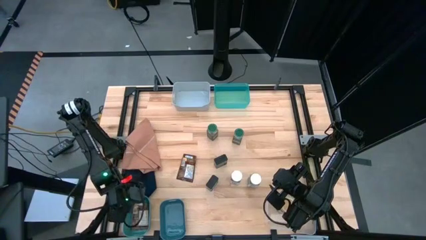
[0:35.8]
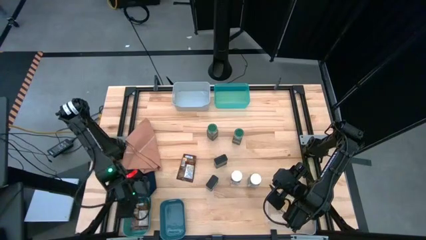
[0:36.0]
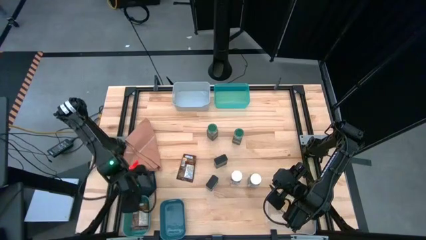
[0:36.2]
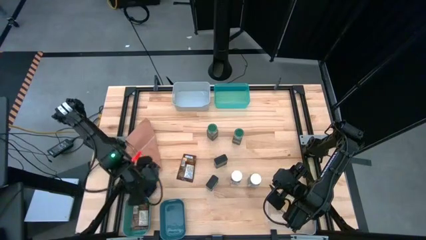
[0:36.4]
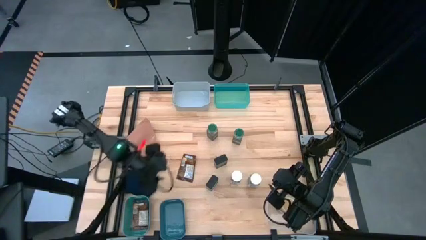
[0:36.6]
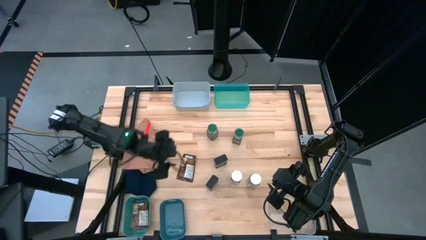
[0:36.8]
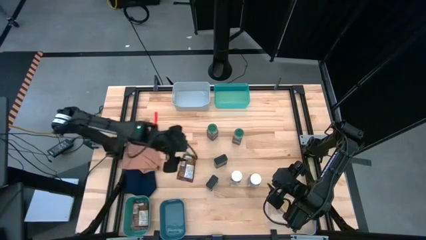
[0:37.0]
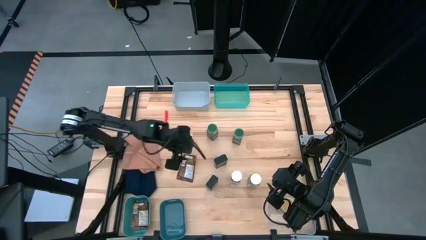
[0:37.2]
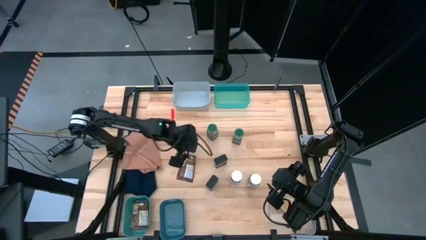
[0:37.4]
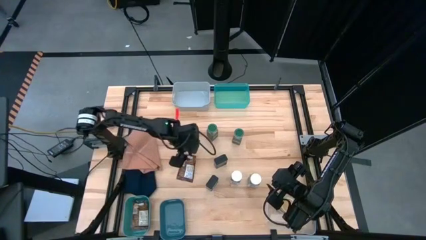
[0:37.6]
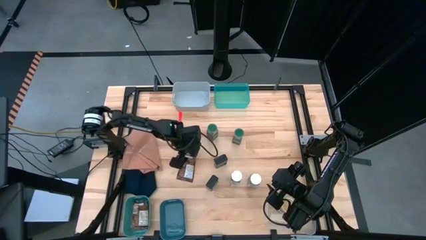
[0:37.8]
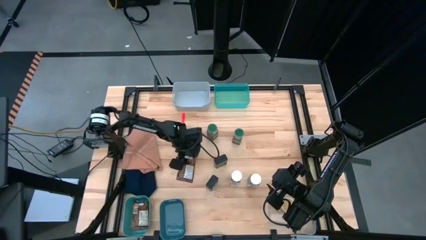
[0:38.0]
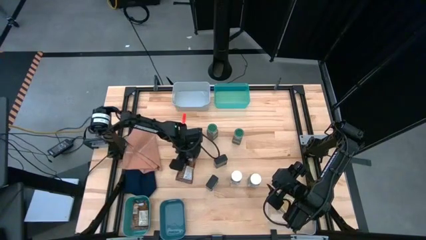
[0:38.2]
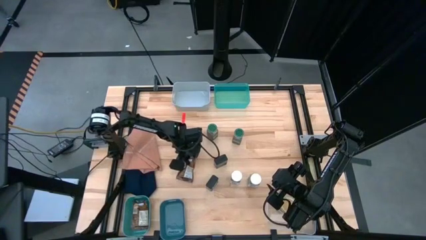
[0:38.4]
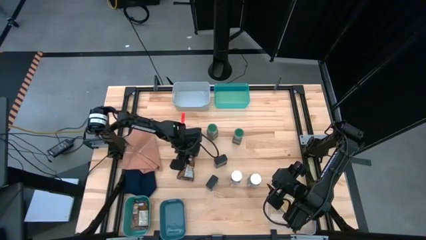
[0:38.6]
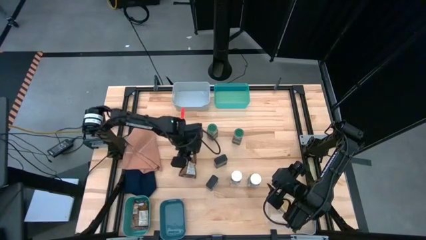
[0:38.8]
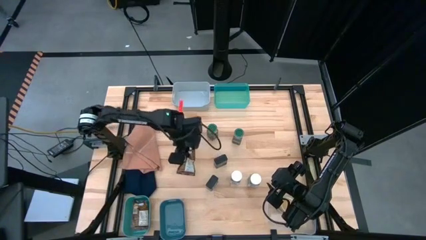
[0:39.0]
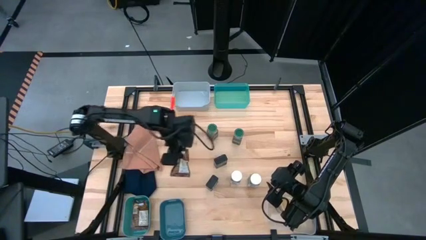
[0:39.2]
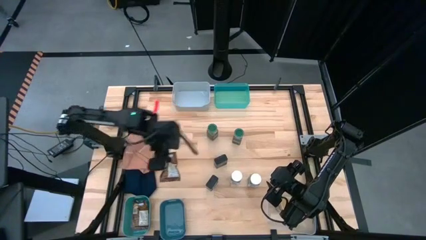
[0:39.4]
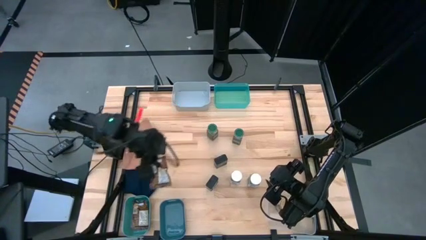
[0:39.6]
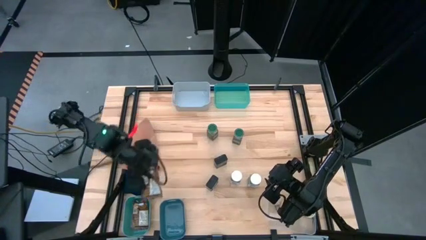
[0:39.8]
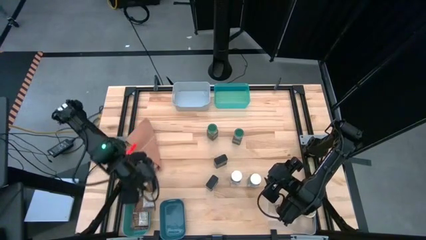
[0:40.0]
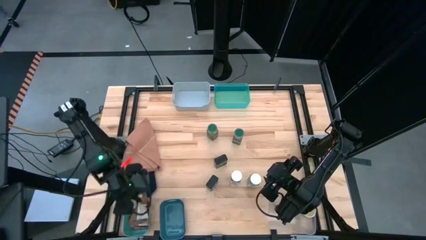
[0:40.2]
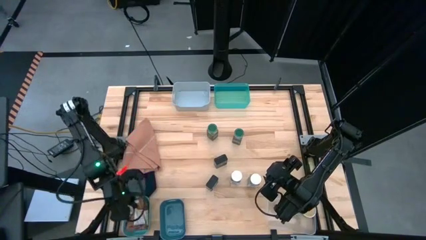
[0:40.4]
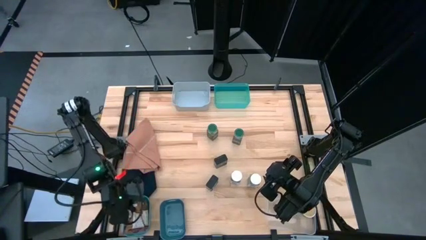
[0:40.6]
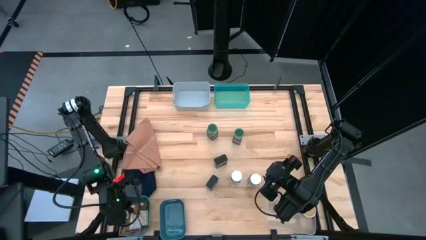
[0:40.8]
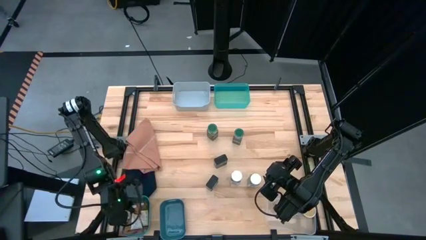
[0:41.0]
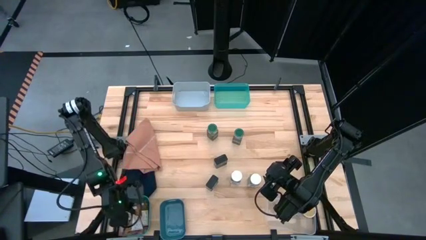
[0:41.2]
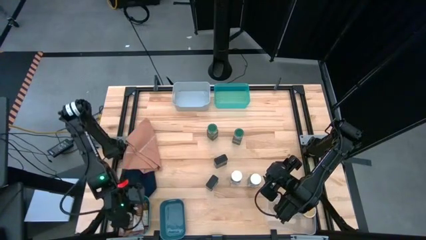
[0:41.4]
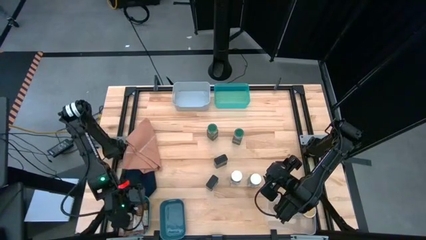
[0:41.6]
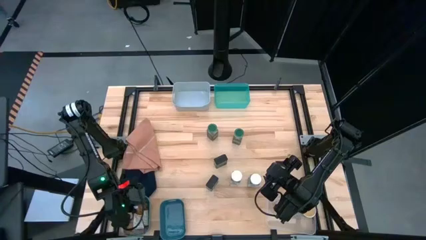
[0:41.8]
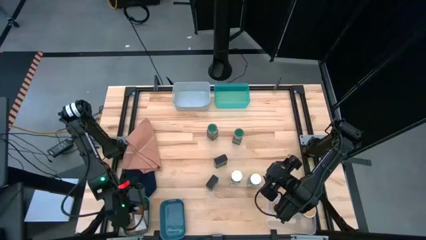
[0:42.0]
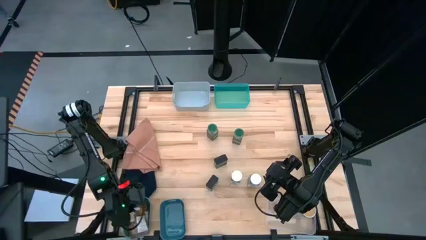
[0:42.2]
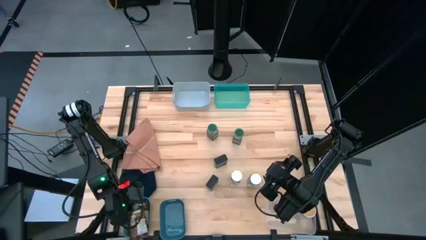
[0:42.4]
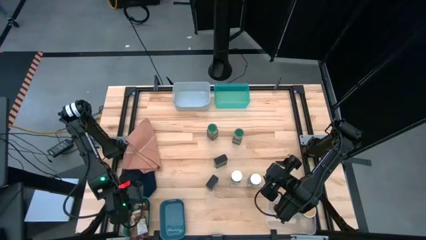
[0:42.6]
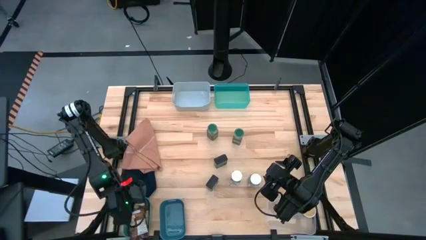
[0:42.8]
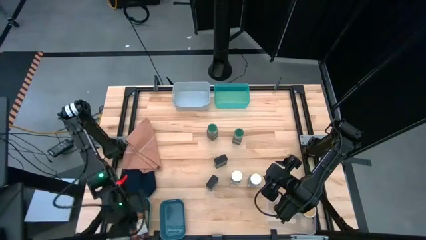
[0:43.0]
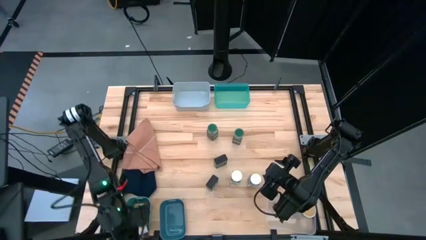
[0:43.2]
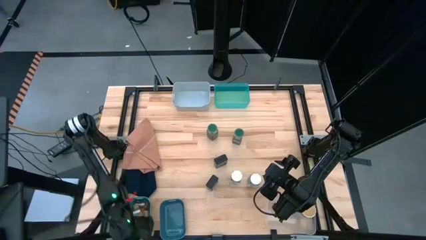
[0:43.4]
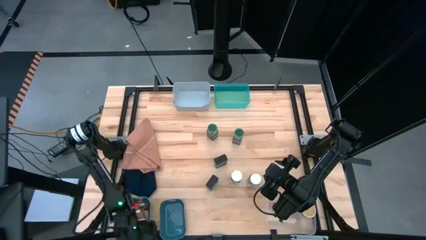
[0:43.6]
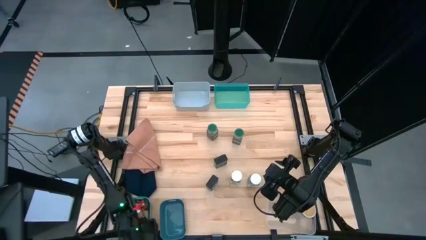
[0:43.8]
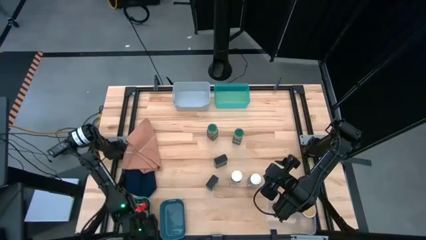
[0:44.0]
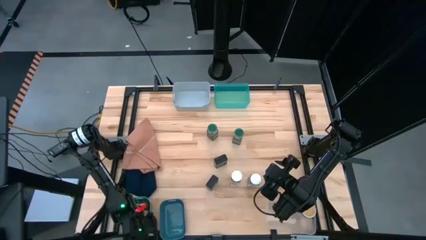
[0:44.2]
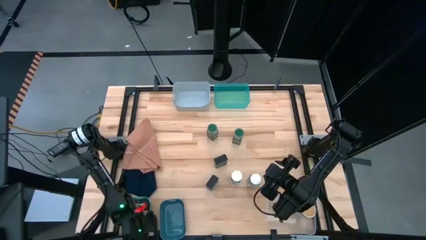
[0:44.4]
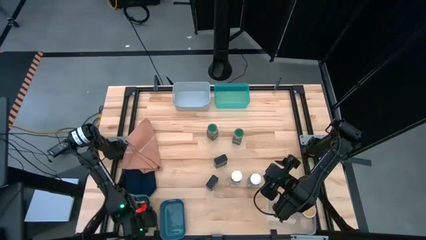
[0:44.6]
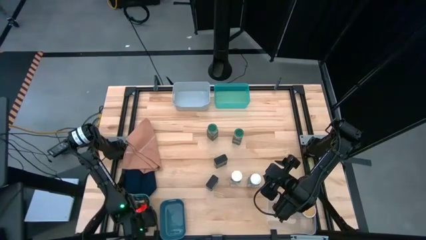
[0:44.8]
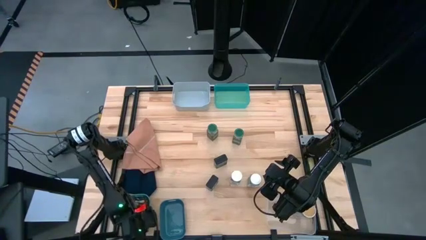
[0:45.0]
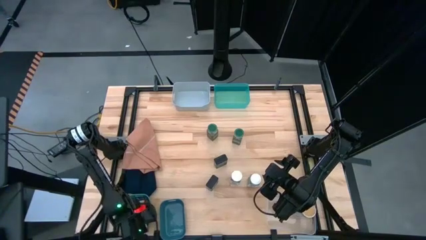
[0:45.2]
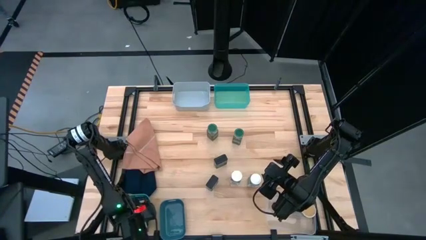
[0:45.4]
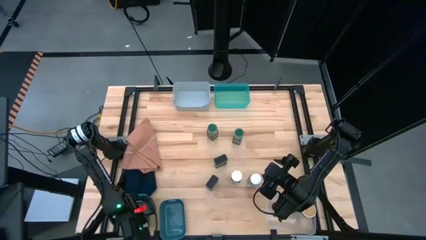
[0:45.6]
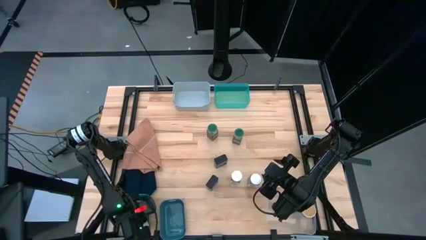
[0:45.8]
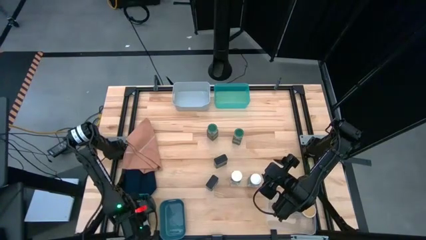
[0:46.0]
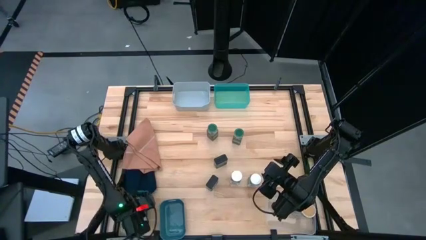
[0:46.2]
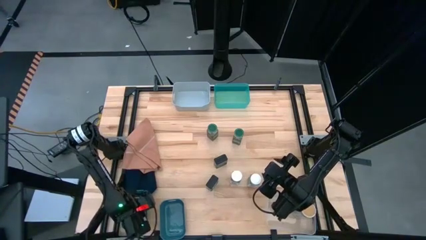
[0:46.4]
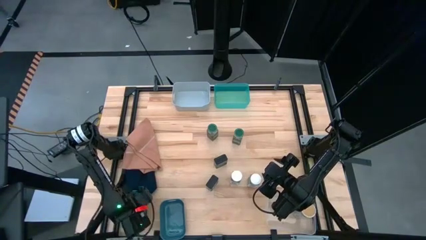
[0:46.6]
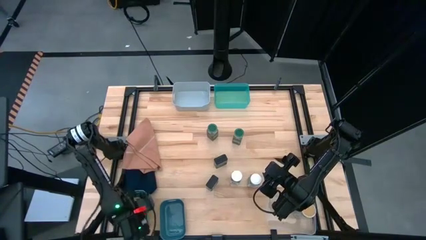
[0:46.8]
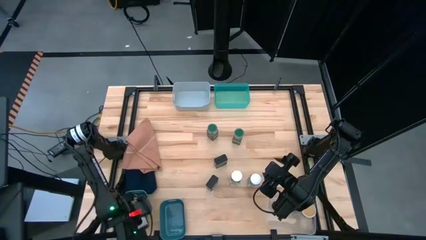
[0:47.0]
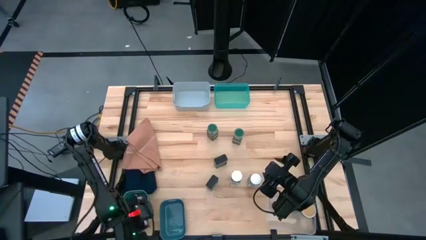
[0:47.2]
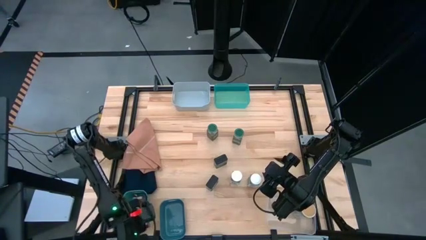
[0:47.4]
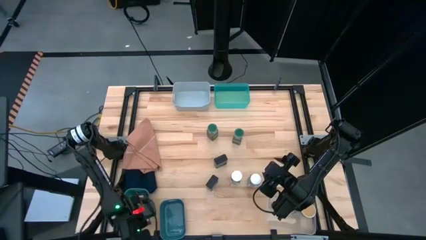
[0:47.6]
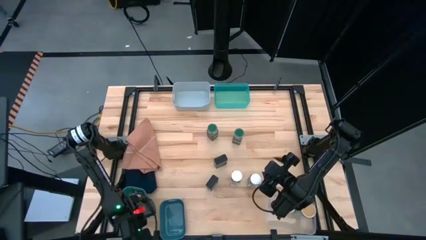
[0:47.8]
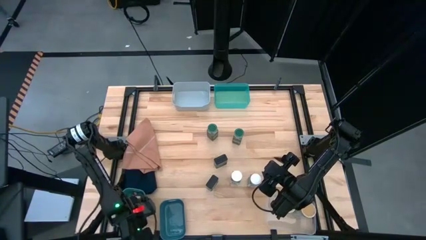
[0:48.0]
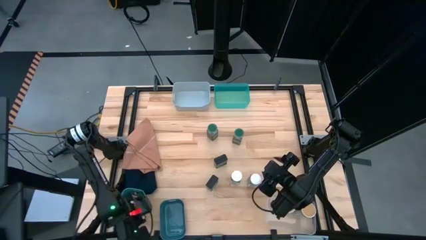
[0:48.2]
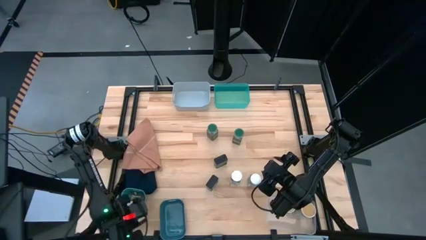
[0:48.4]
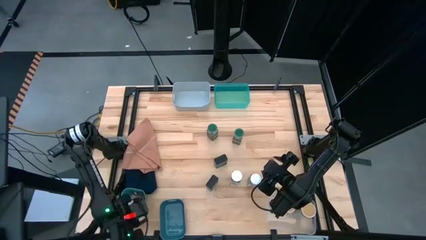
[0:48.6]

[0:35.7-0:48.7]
Task: Sort spices by type
Put the orange spice pack into the green bin
